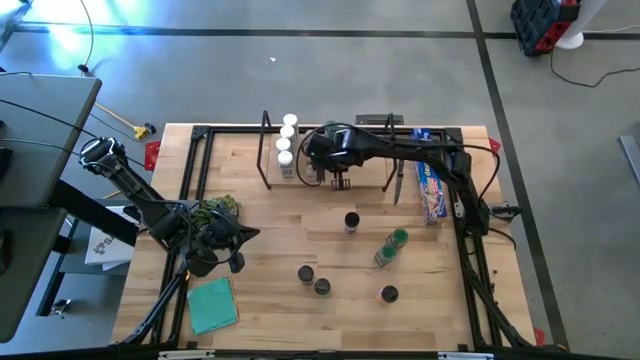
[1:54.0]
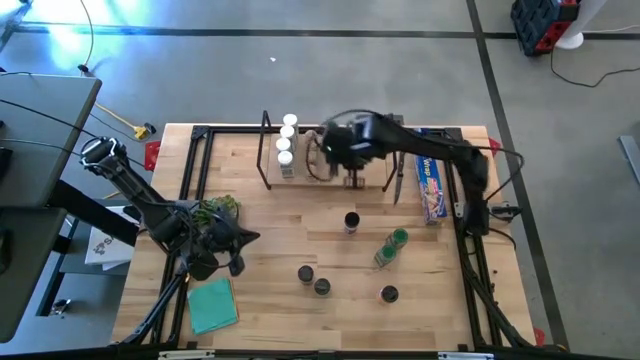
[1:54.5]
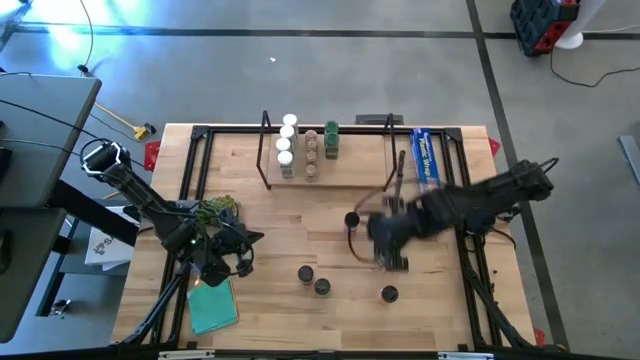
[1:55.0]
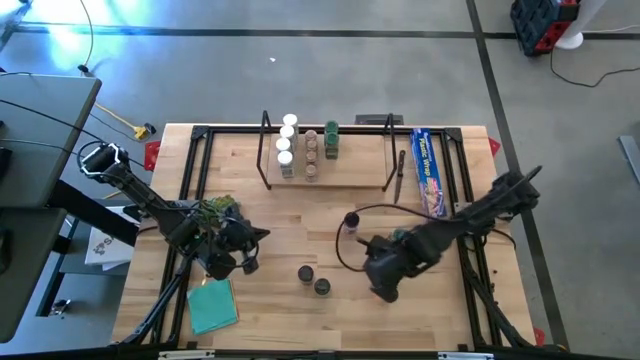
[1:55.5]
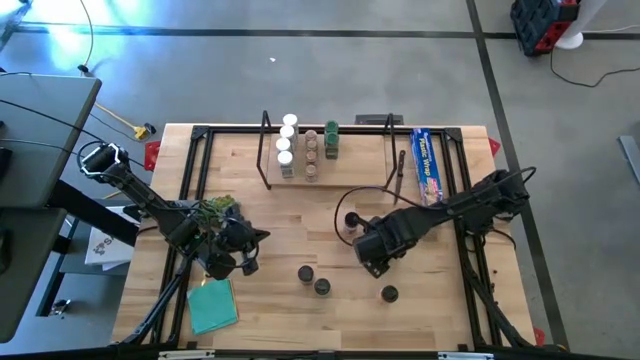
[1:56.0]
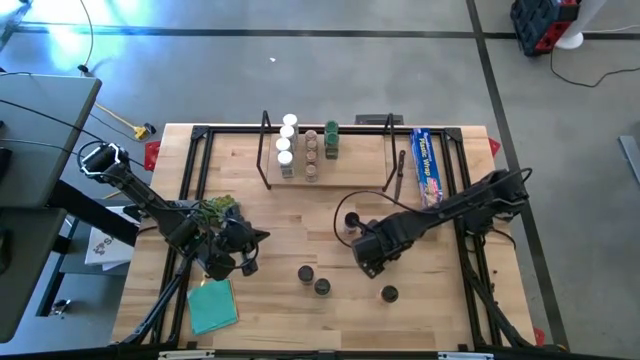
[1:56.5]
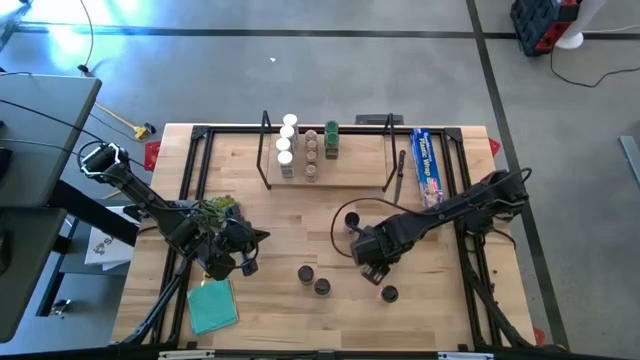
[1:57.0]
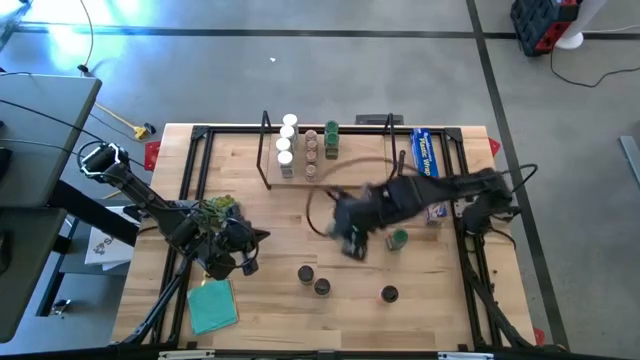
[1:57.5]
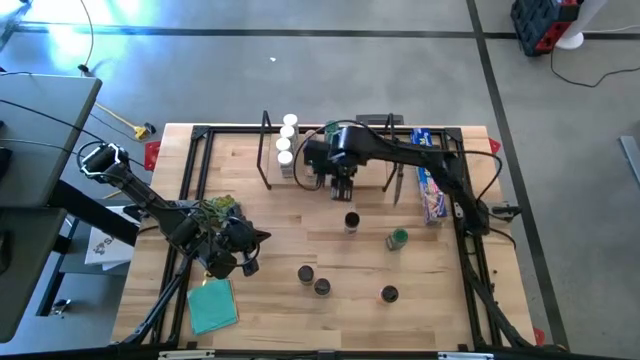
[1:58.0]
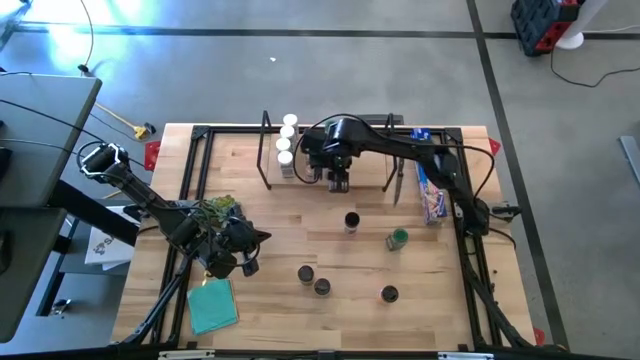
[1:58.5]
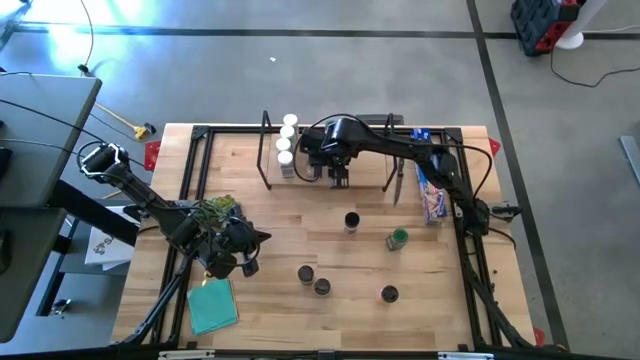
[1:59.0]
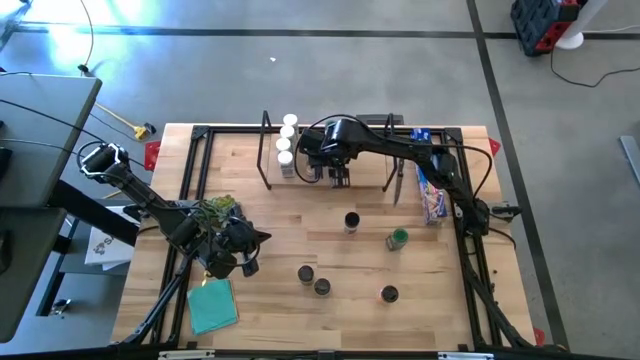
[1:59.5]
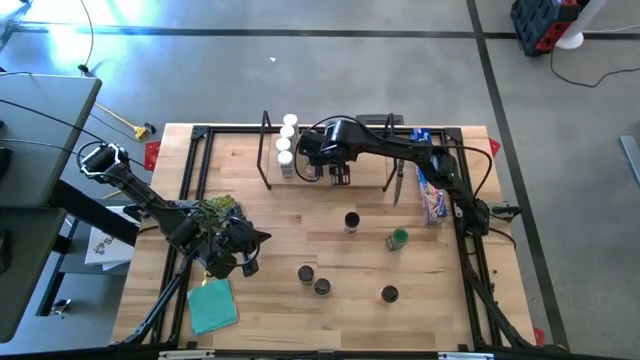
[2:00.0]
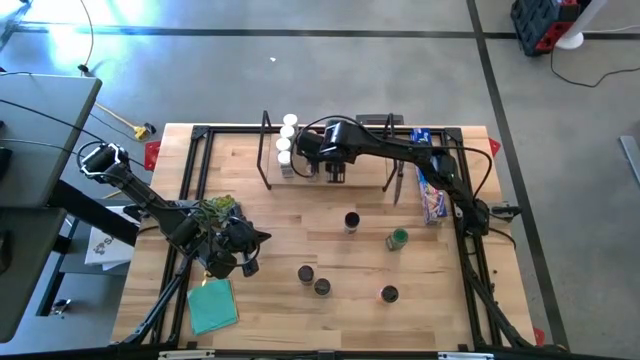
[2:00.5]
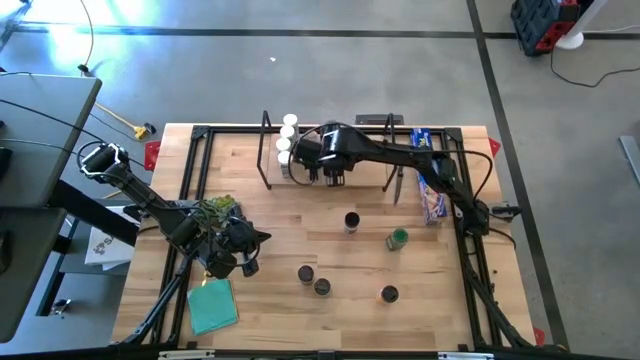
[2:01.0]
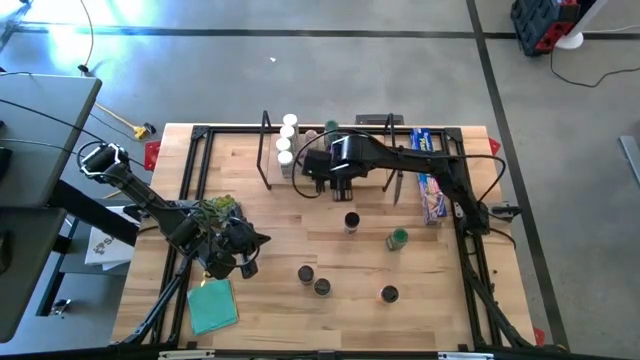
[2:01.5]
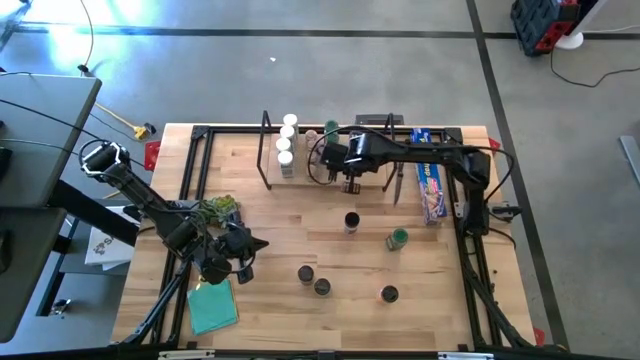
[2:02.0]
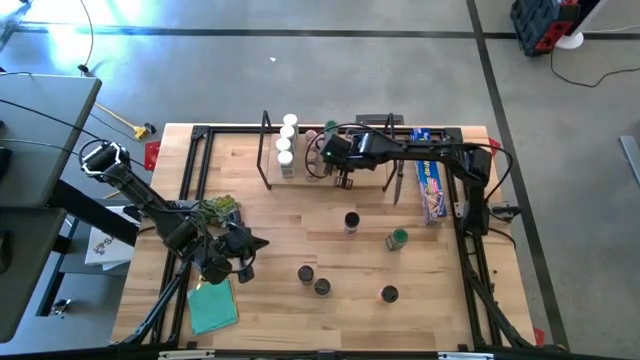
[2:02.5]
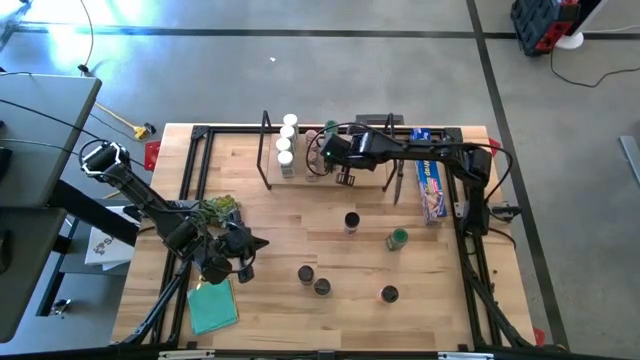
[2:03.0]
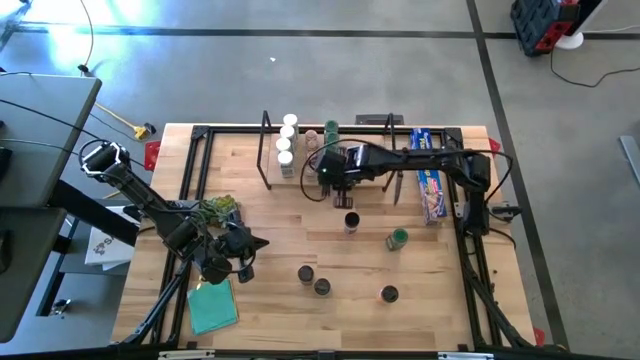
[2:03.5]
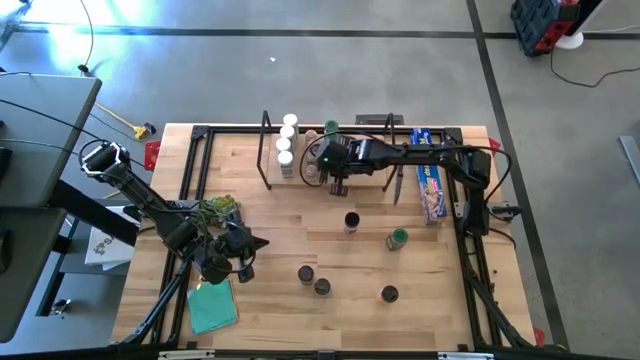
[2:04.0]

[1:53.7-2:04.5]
Task: Shelf spices
Put the green seasoning bottle on the shelf aligned with the other green seasoning bottles

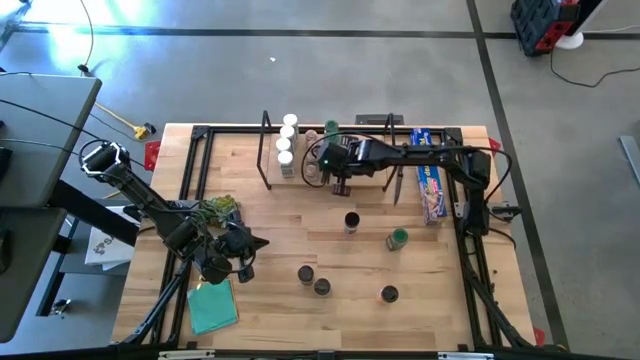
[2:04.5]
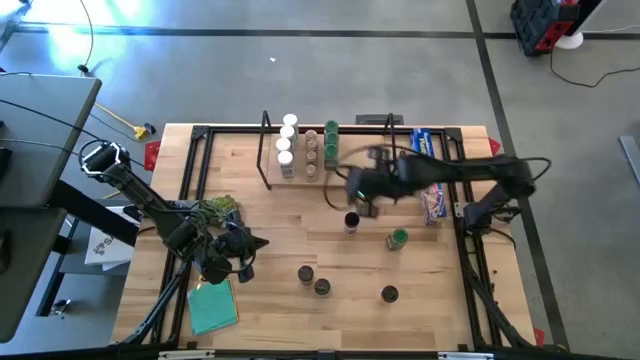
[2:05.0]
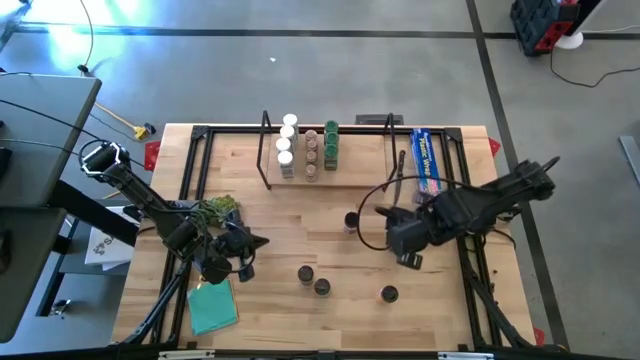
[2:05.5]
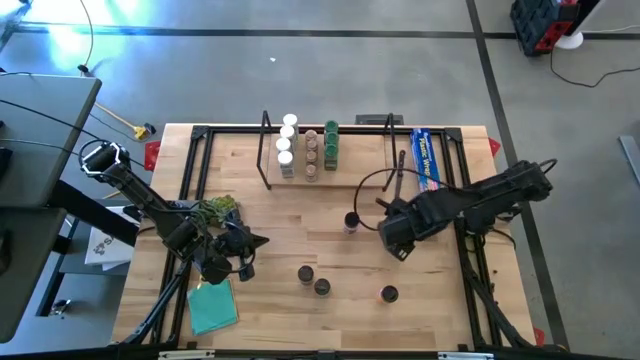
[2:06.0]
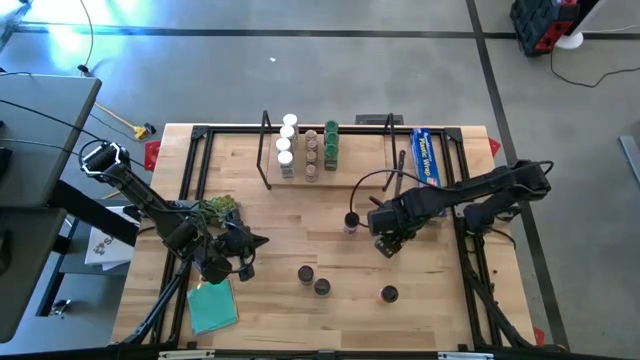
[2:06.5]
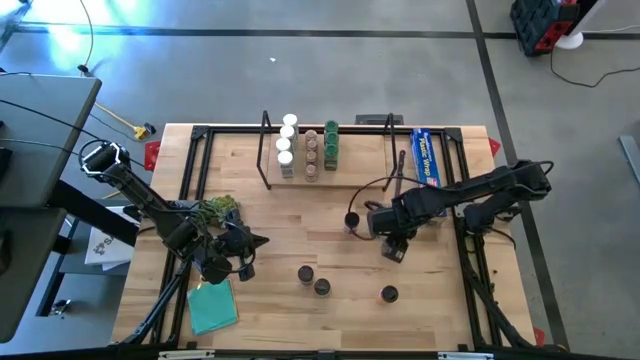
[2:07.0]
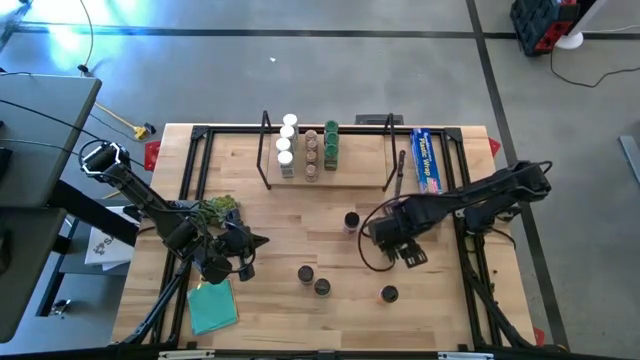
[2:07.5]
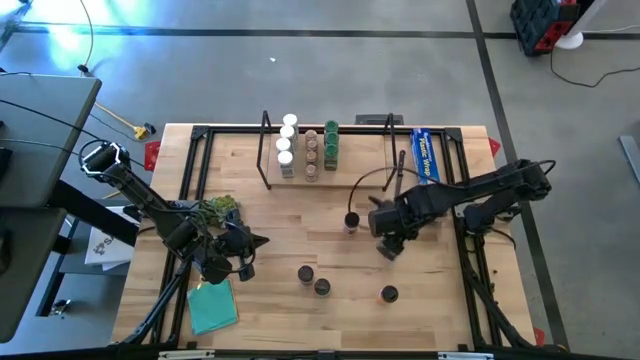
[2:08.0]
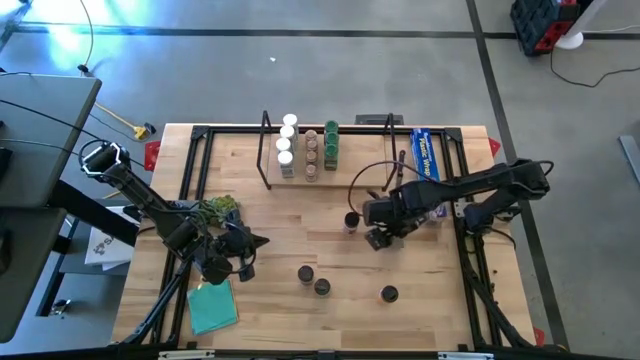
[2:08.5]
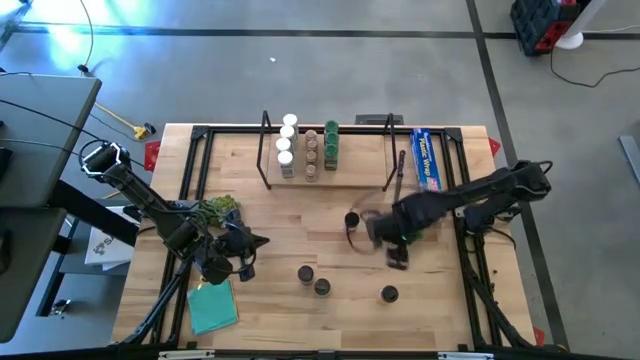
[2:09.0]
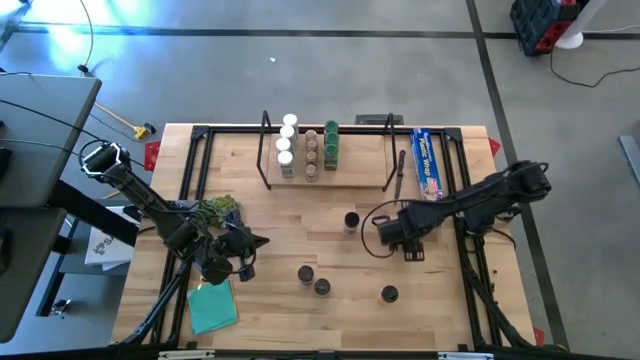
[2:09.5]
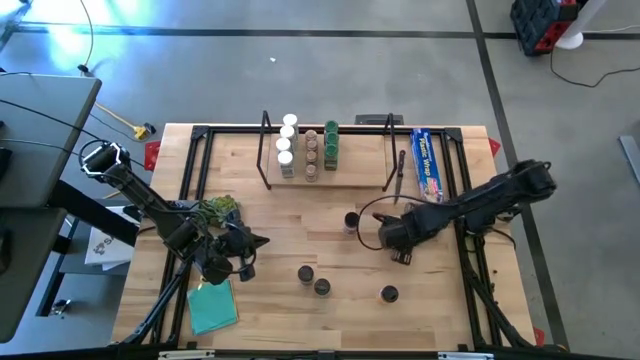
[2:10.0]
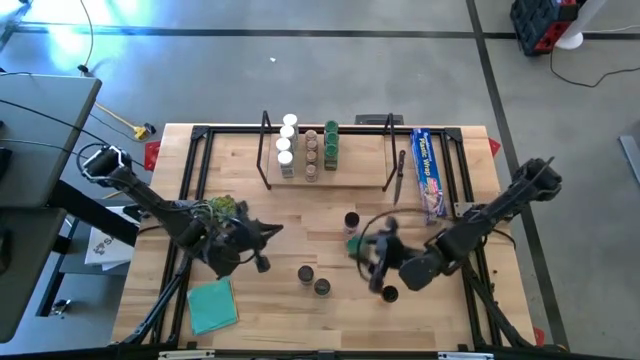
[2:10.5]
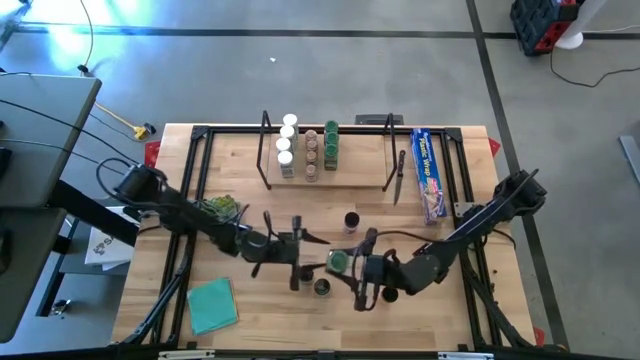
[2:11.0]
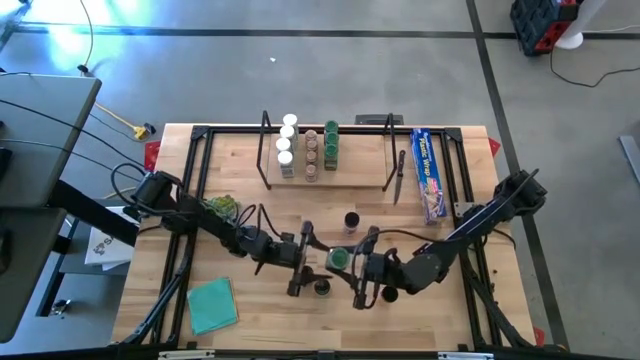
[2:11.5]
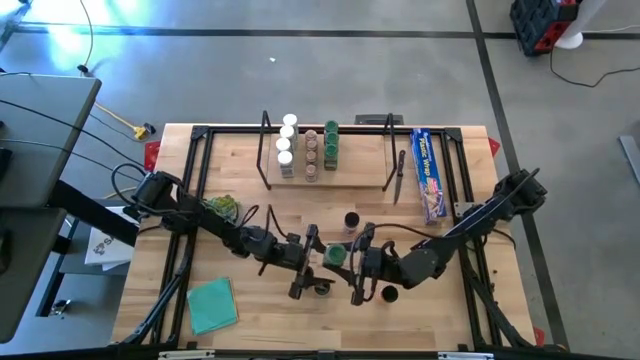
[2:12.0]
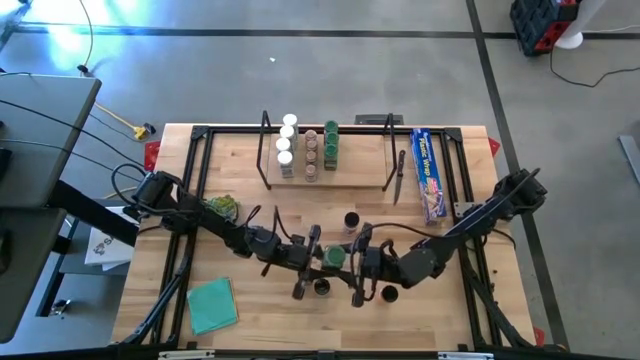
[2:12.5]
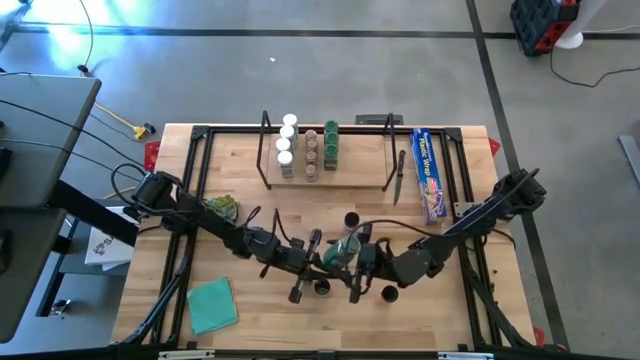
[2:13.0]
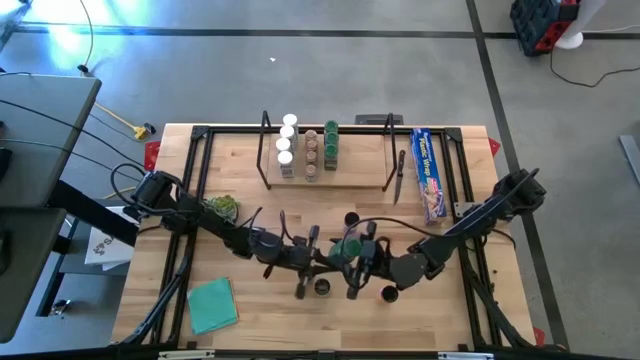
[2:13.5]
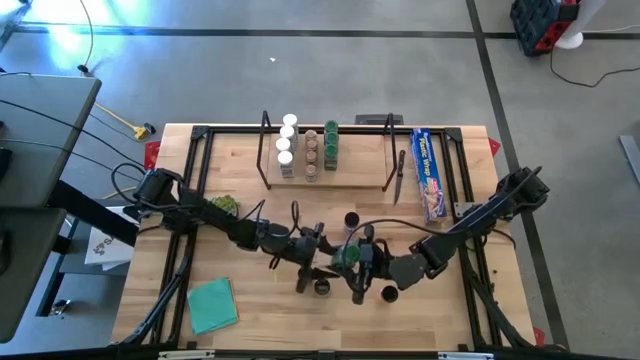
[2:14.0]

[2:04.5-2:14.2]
Put the green seasoning bottle on the shelf aligned with the other green seasoning bottles

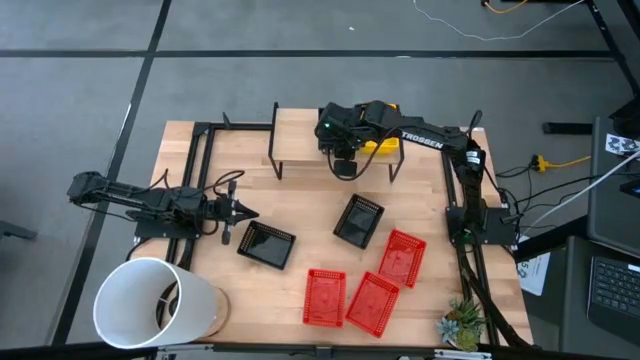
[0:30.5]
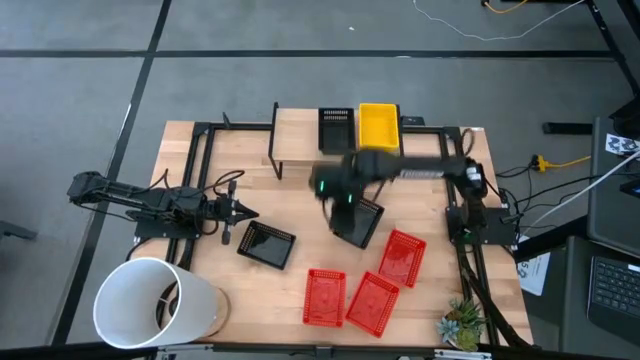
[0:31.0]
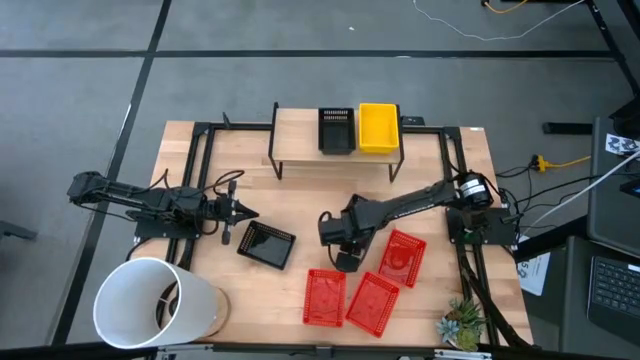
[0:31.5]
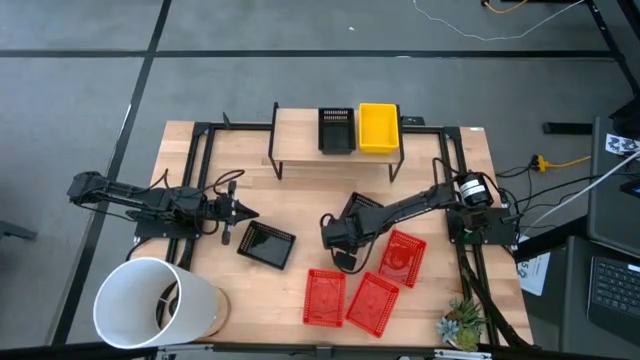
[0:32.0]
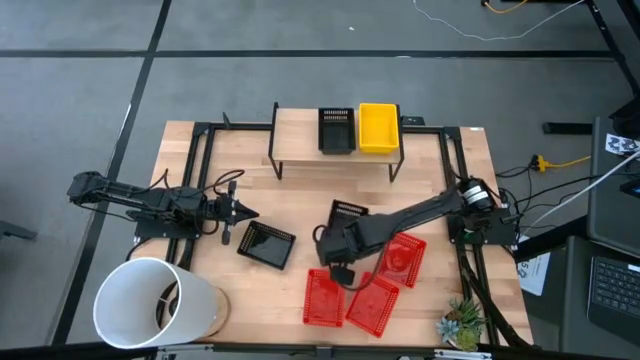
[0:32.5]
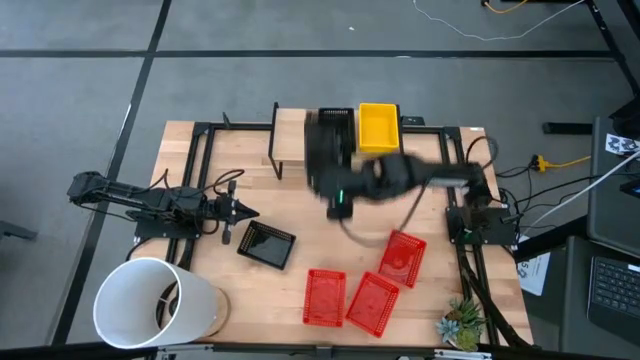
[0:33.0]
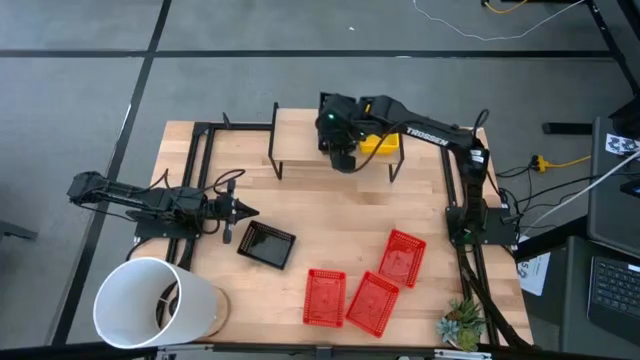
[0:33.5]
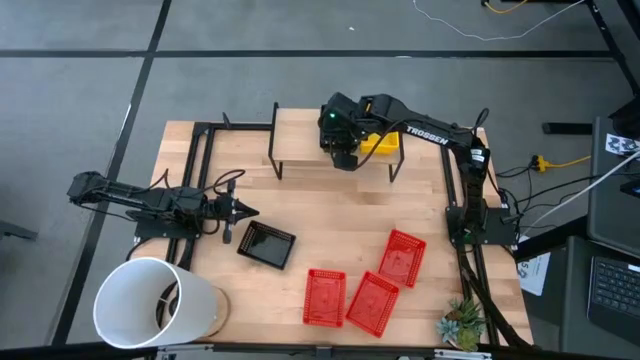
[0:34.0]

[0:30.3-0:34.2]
Task: Stack baskets on shelf by color
Stack the top black basket on top of the black basket on the shelf
